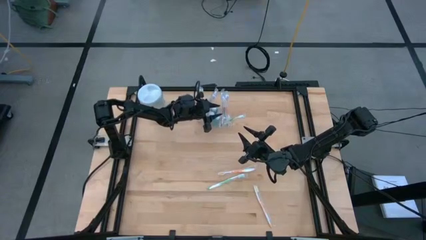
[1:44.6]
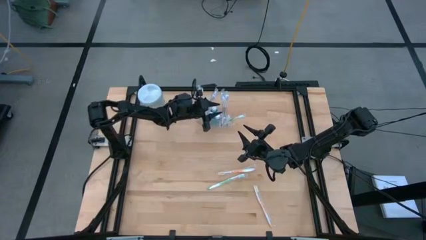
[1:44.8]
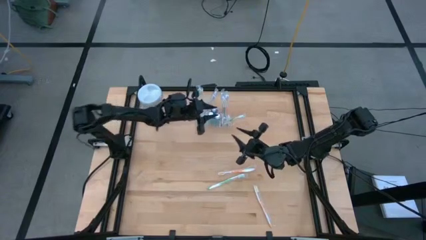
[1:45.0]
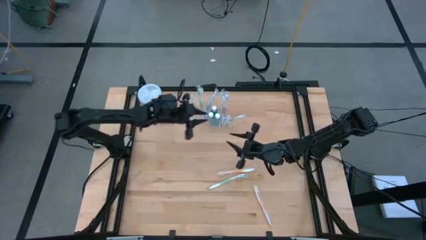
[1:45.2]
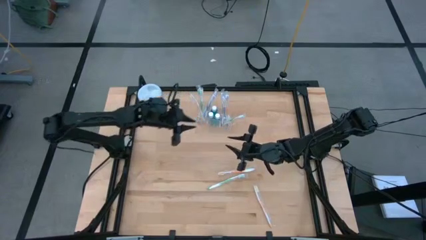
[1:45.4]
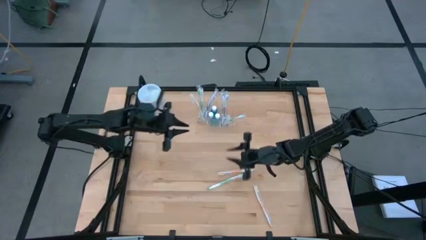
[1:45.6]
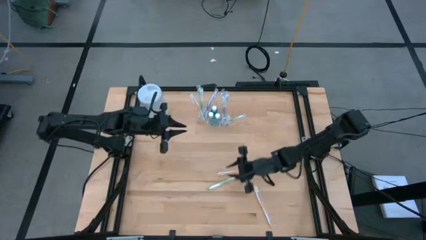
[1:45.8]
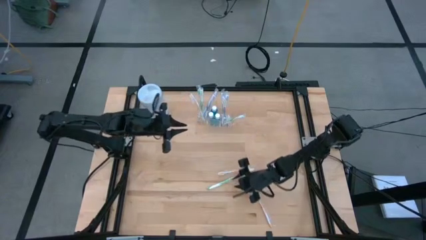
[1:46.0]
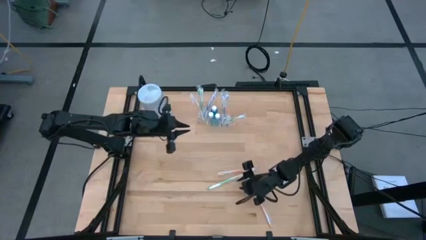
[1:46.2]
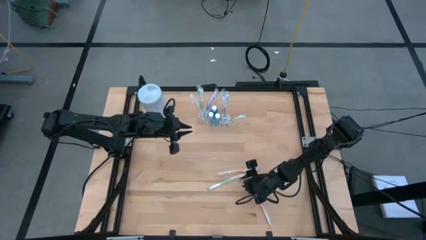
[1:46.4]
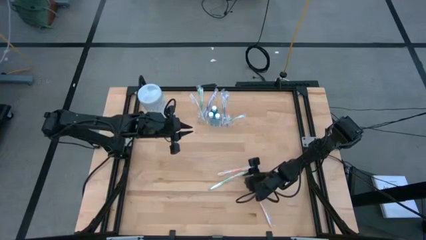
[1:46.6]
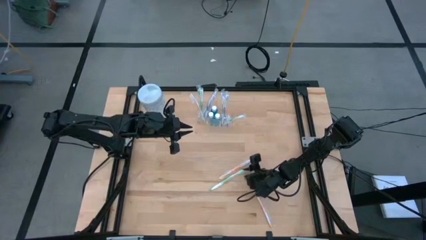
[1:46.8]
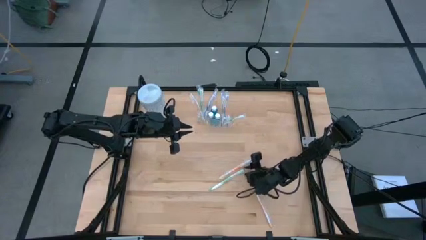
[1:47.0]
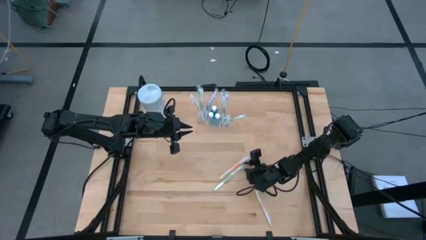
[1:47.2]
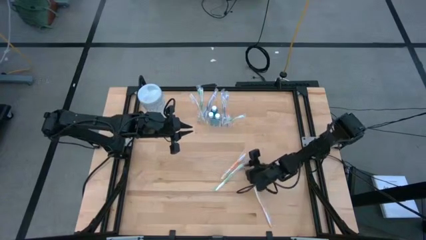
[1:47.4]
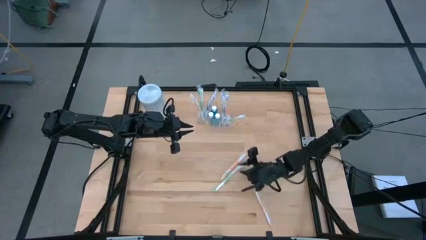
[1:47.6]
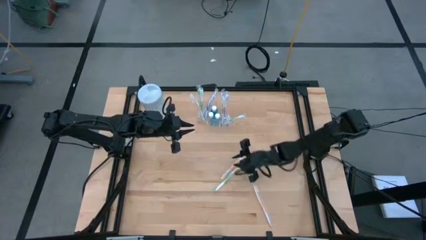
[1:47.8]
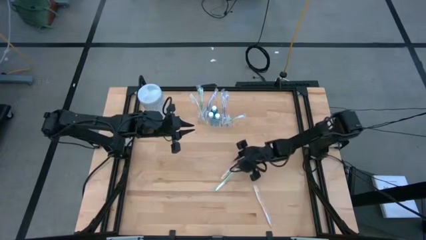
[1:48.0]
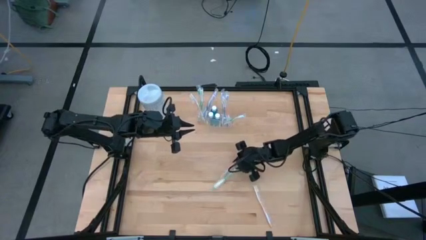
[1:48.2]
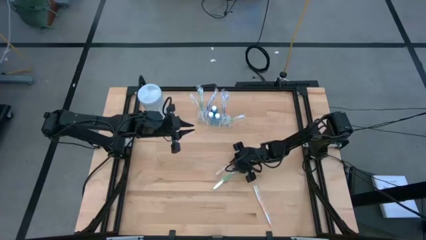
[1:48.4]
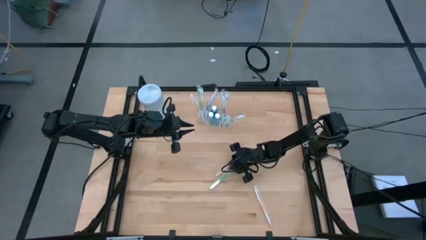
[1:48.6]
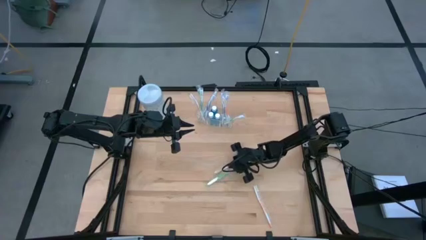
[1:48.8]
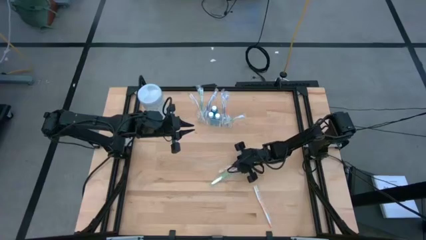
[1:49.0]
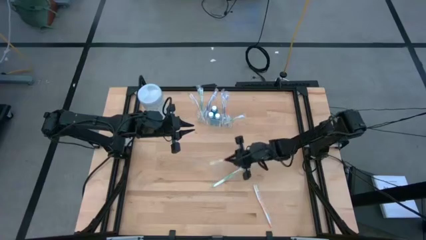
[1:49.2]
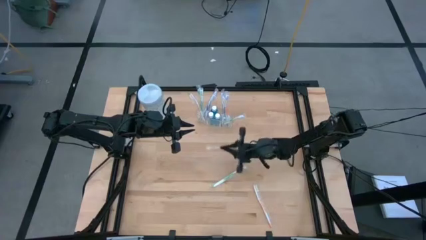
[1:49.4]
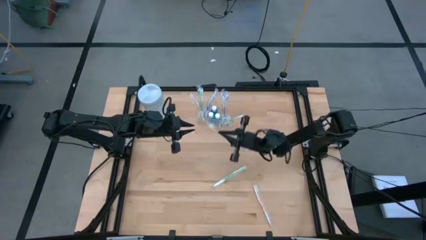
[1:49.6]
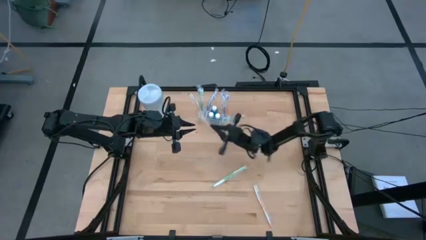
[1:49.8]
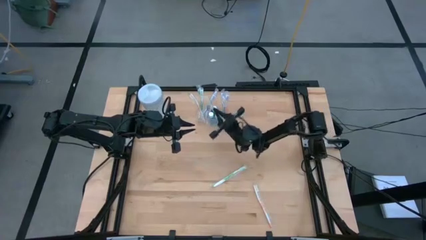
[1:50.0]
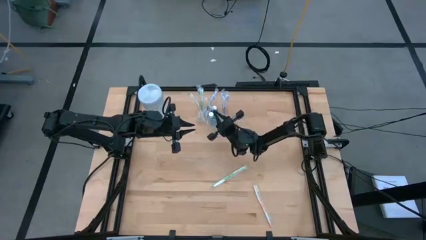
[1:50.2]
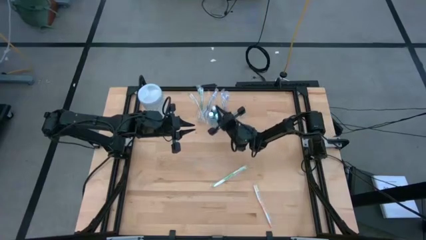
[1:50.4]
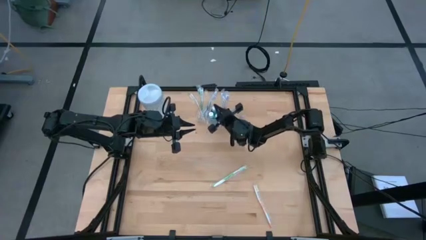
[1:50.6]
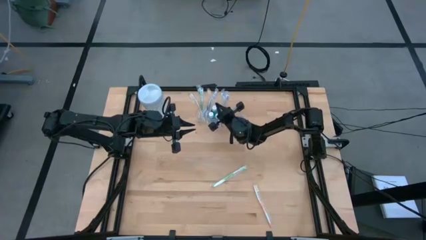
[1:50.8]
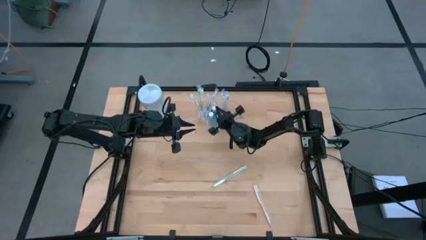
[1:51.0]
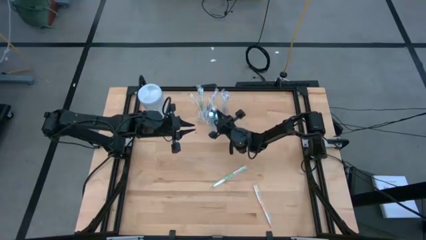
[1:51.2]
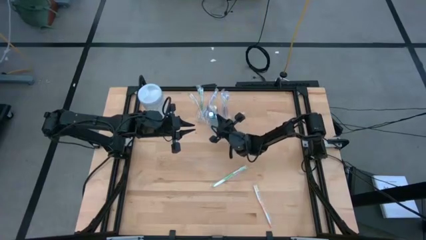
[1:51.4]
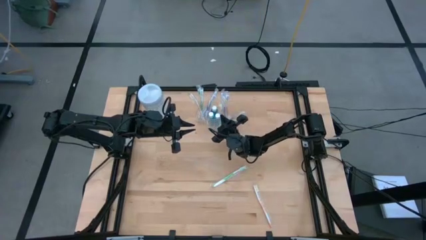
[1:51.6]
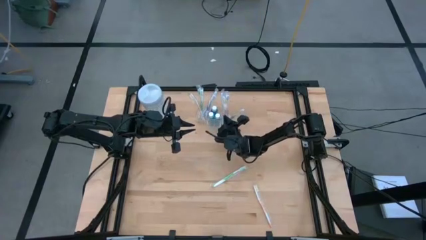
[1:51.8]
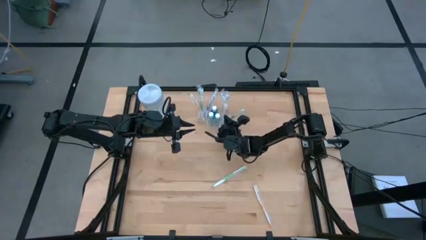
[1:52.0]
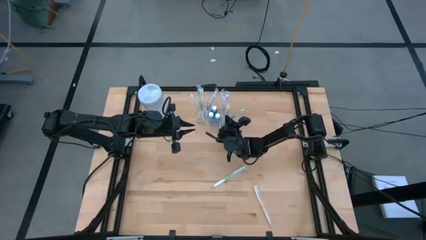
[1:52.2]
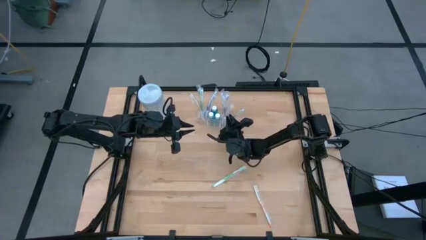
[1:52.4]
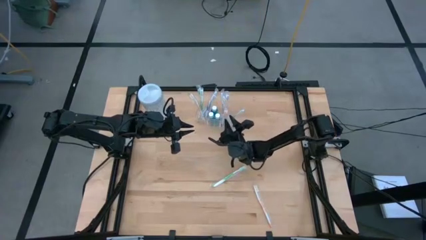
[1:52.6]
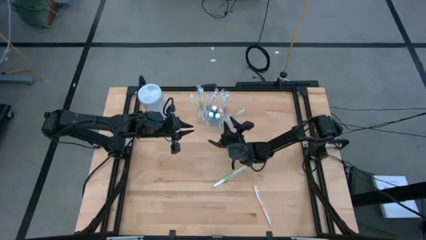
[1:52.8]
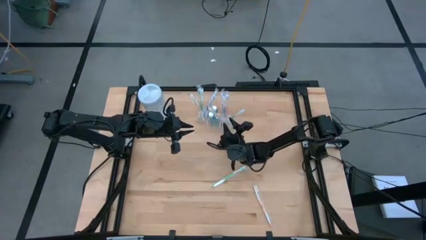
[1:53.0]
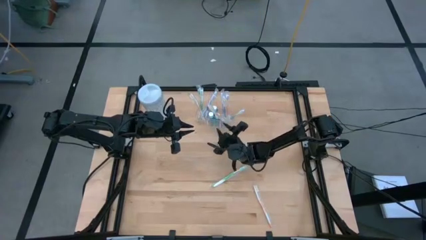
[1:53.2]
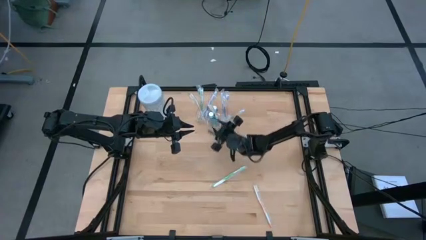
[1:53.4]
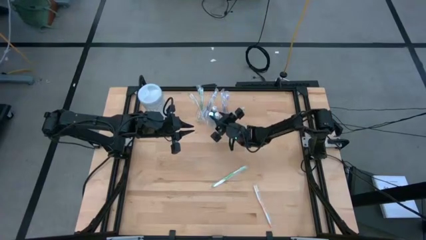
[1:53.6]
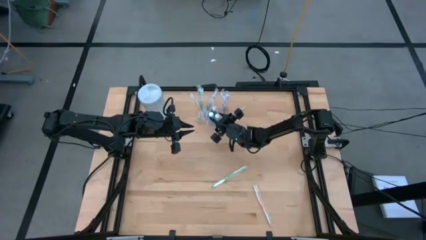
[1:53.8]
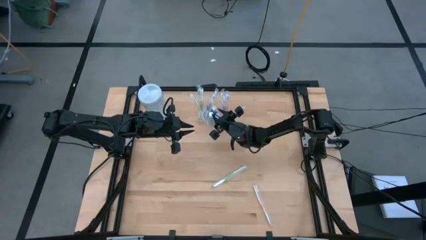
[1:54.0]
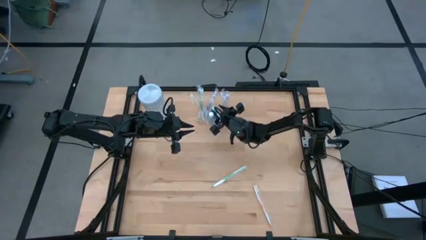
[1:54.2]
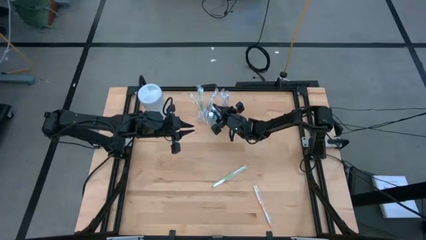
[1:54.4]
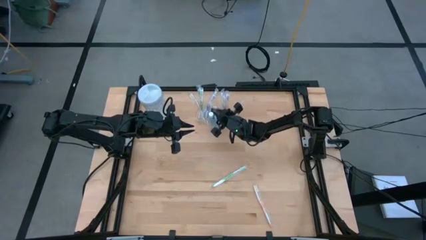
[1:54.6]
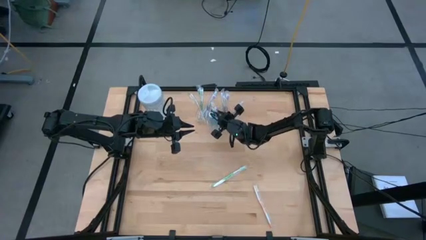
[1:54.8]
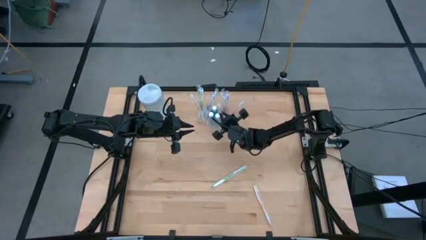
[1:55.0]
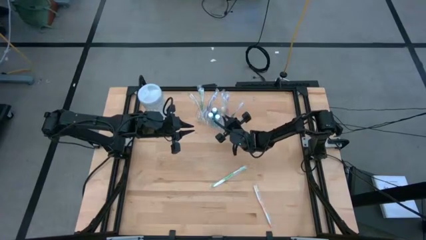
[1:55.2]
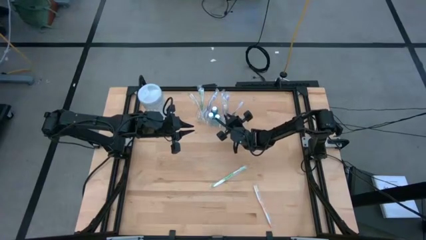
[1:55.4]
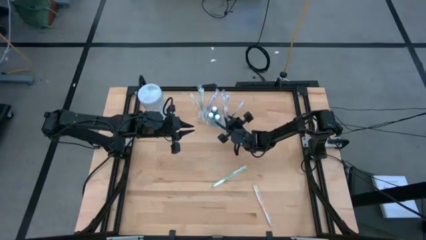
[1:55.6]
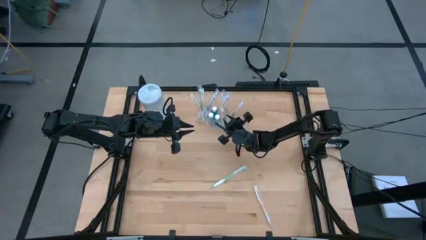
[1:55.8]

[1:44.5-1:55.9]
Task: Pick & Place toothbrushing station
Put the orange toothbrush into the transparent organizer

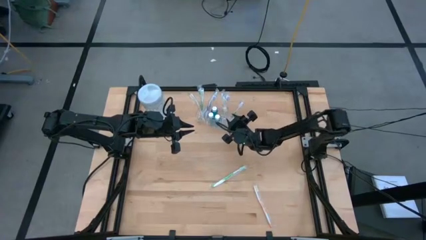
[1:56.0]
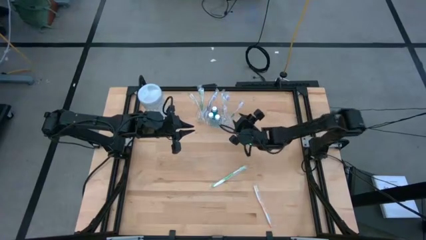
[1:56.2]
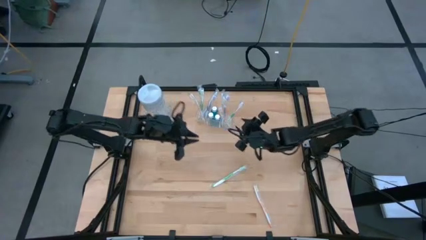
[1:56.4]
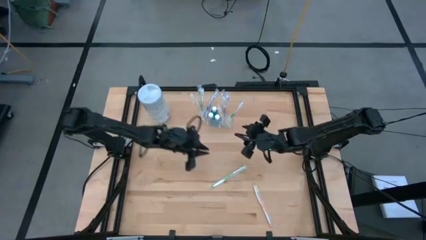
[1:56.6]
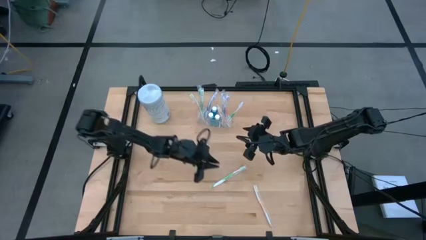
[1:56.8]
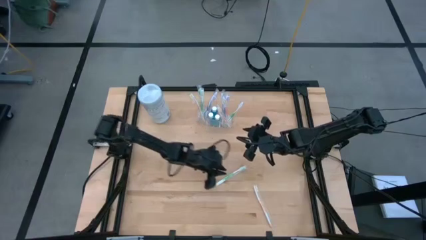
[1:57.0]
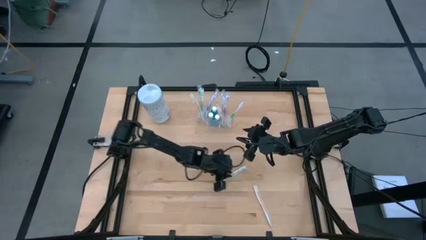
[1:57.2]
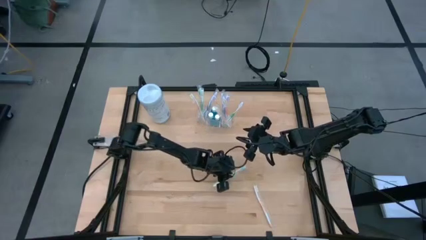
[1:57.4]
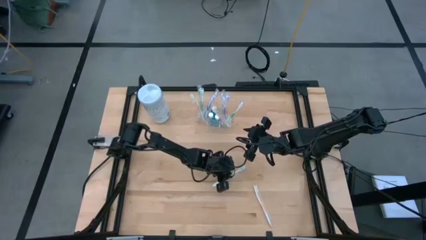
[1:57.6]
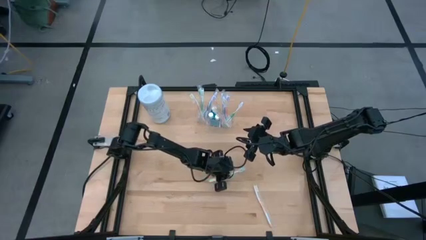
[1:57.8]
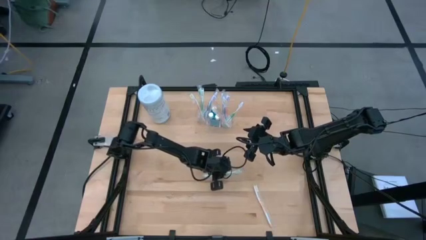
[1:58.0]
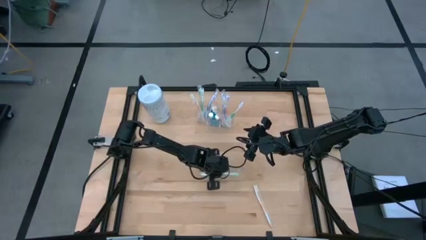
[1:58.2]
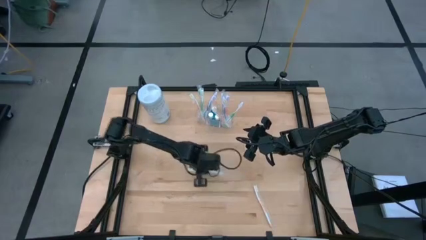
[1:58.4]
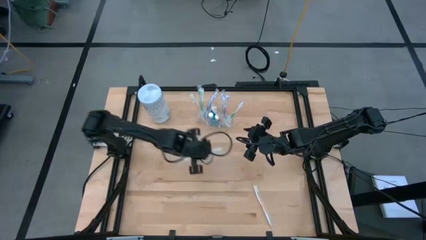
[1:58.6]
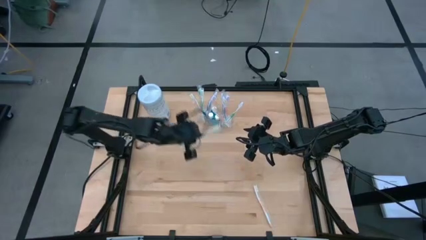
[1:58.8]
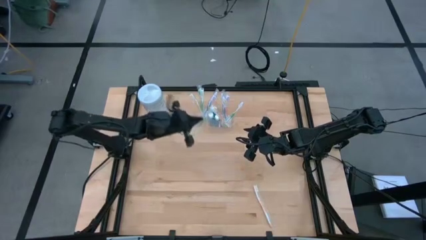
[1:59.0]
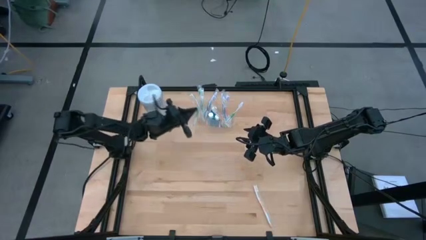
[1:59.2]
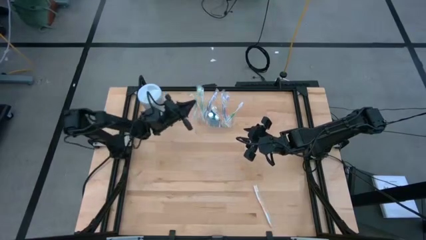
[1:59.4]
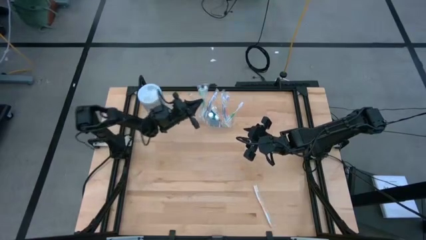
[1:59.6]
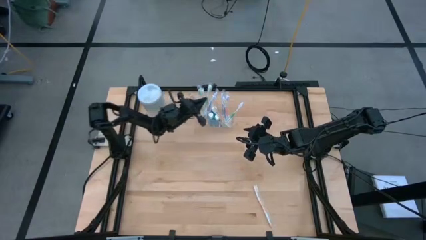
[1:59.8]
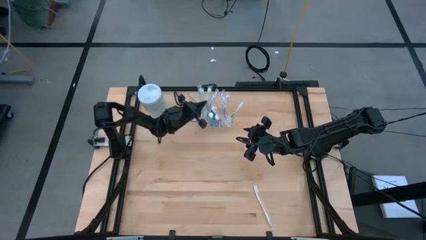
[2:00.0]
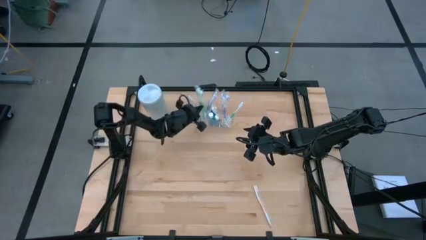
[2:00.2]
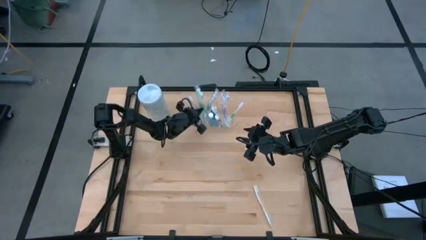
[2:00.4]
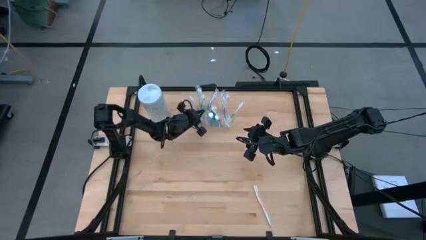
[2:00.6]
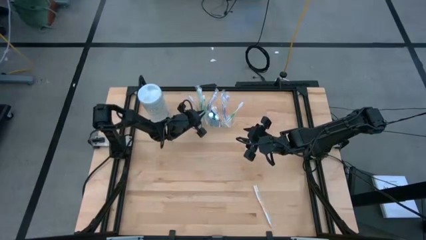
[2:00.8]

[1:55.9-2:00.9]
Put the green toothbrush into the transparent organizer
